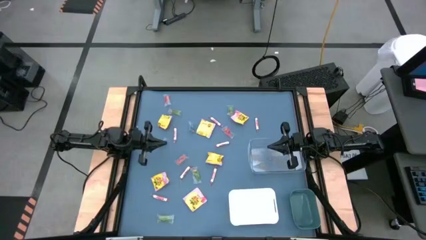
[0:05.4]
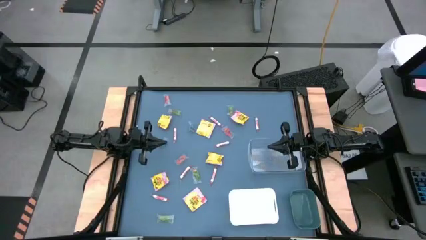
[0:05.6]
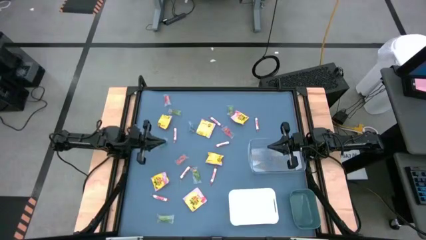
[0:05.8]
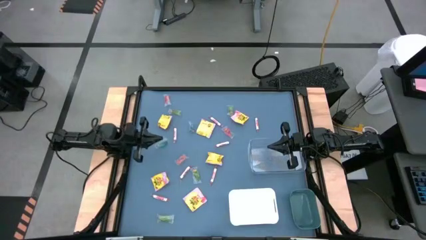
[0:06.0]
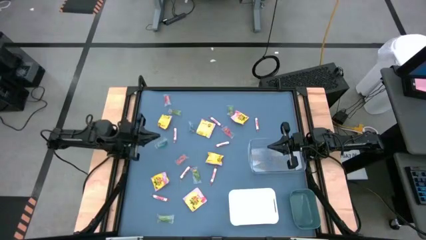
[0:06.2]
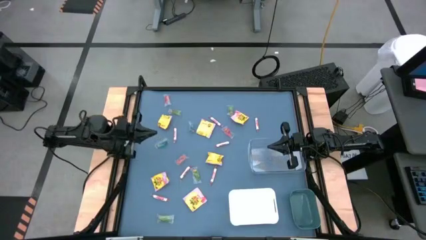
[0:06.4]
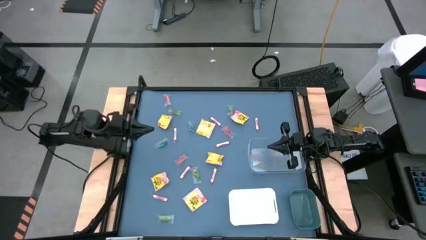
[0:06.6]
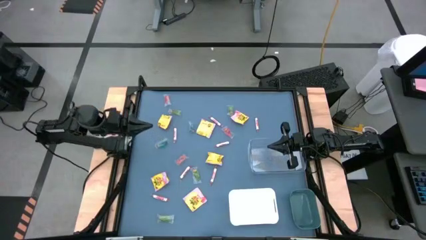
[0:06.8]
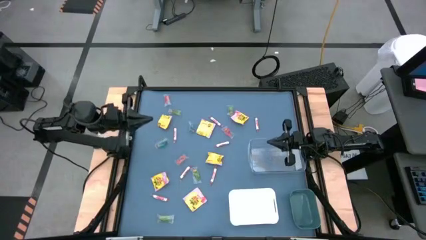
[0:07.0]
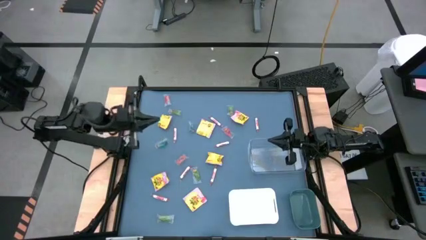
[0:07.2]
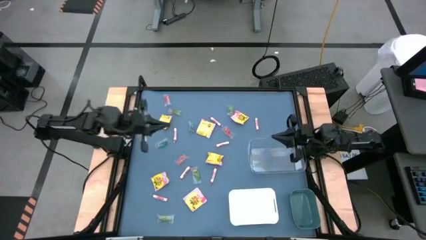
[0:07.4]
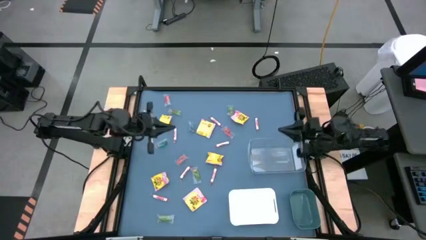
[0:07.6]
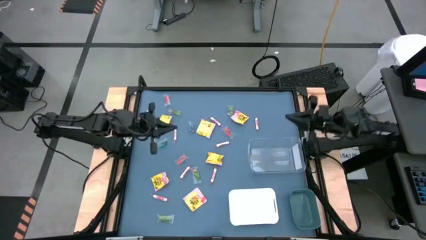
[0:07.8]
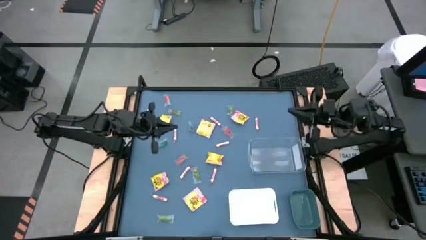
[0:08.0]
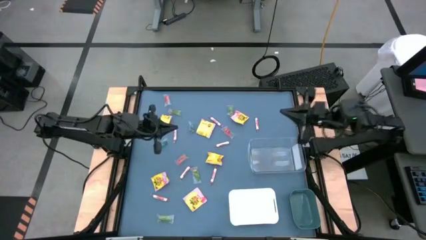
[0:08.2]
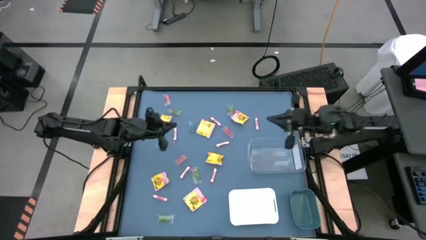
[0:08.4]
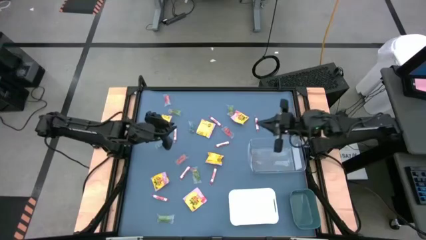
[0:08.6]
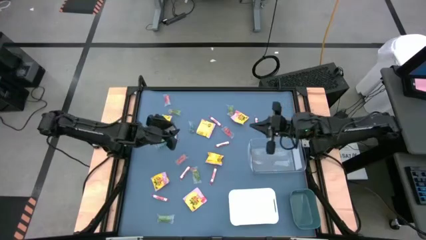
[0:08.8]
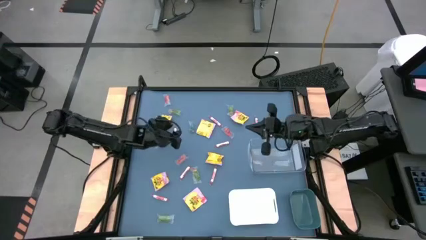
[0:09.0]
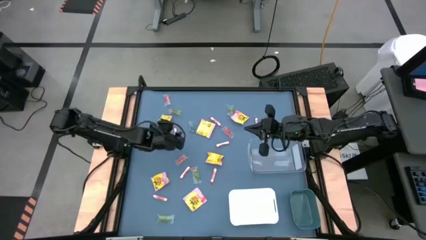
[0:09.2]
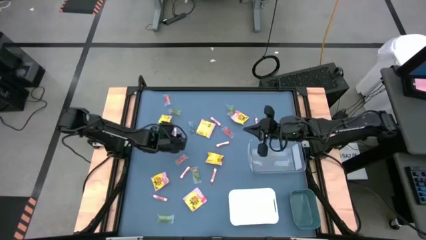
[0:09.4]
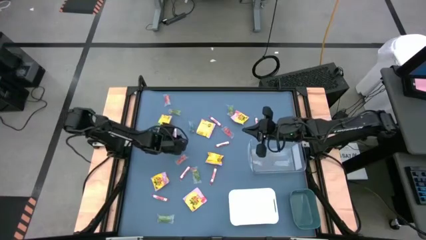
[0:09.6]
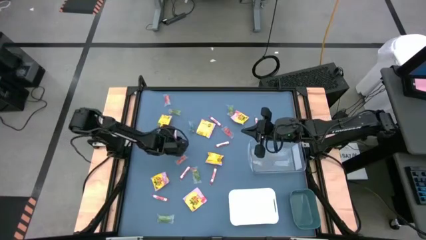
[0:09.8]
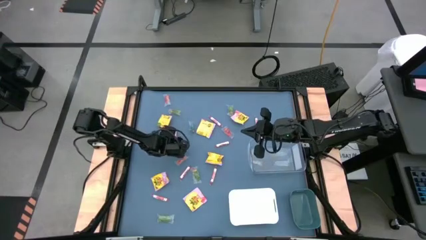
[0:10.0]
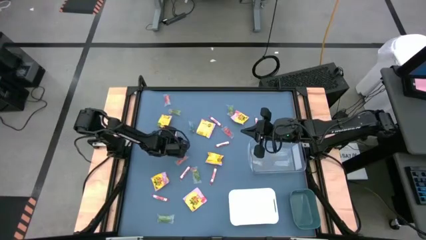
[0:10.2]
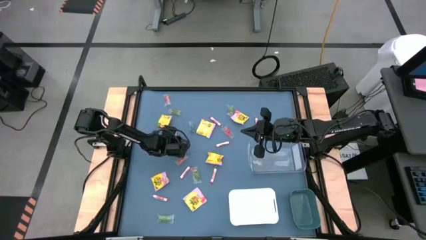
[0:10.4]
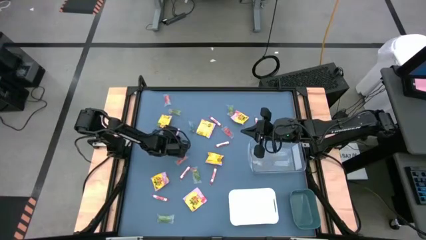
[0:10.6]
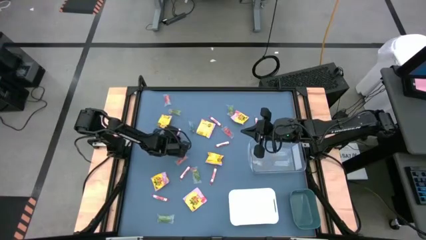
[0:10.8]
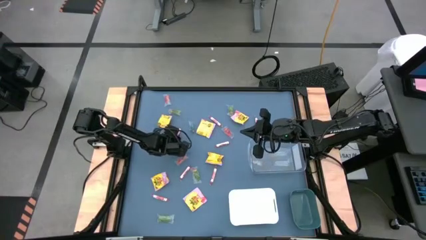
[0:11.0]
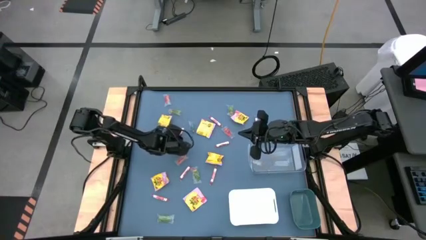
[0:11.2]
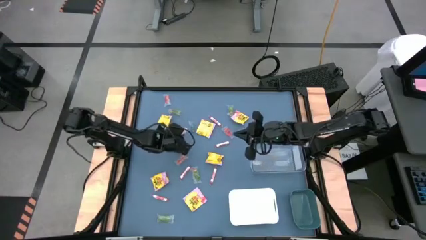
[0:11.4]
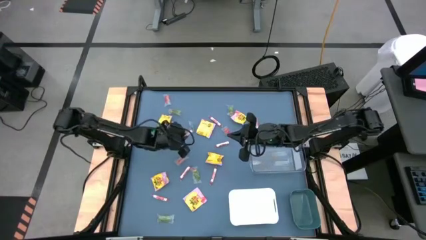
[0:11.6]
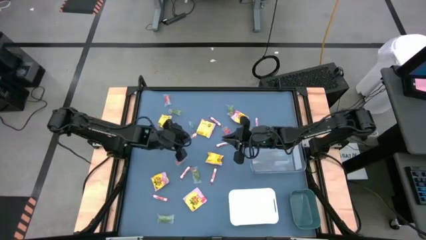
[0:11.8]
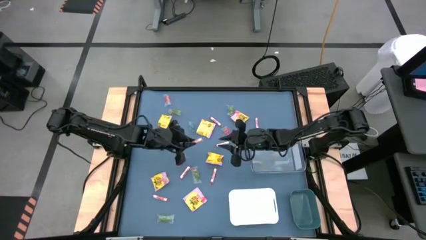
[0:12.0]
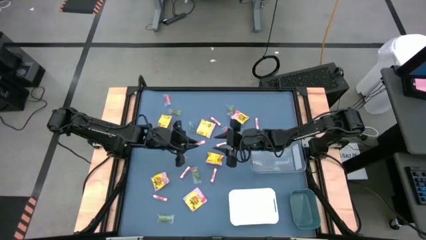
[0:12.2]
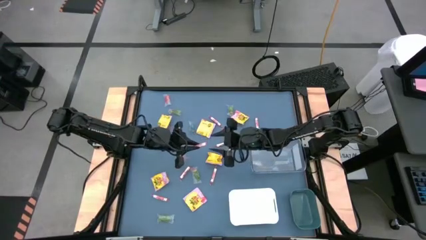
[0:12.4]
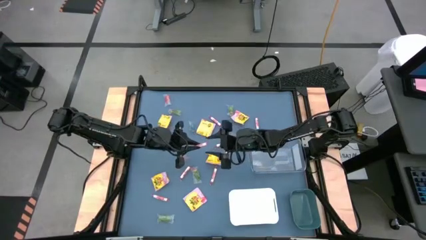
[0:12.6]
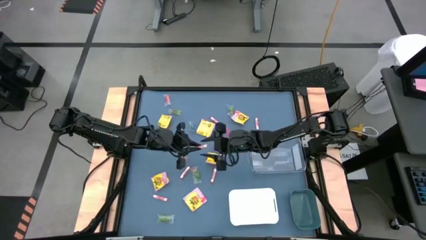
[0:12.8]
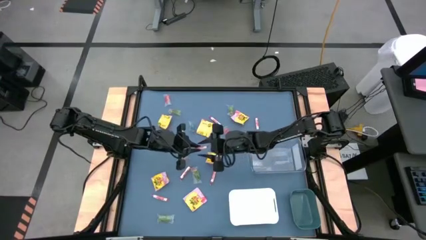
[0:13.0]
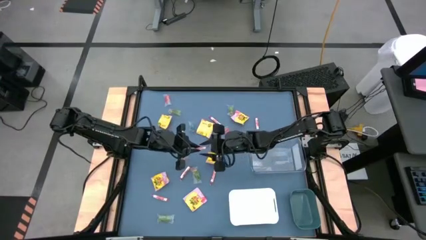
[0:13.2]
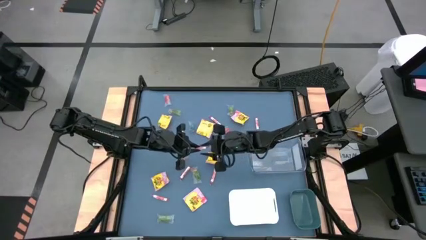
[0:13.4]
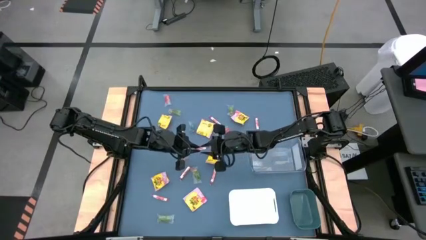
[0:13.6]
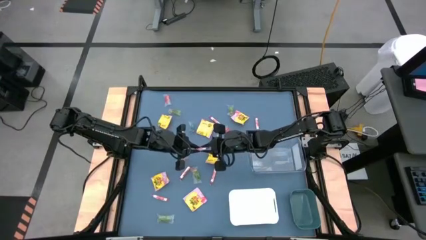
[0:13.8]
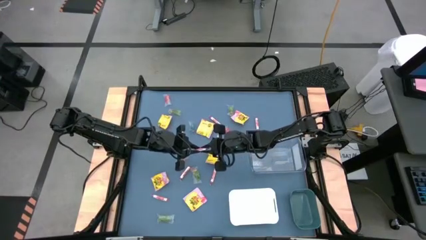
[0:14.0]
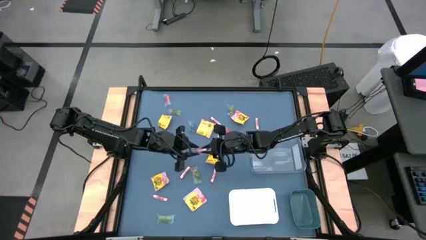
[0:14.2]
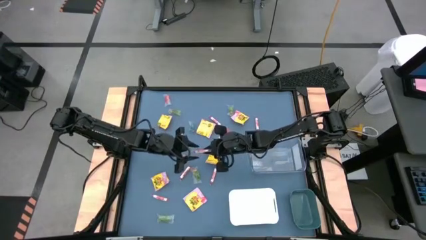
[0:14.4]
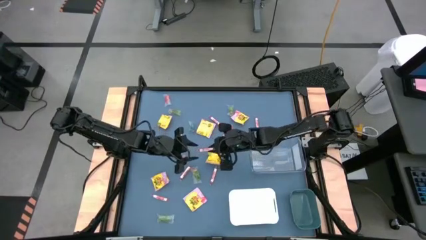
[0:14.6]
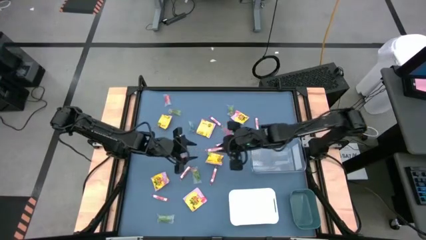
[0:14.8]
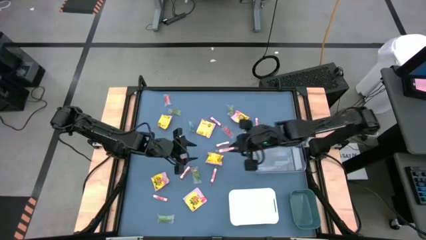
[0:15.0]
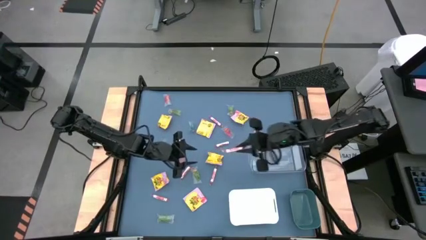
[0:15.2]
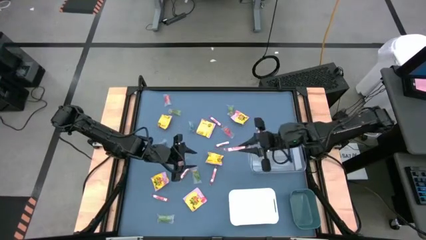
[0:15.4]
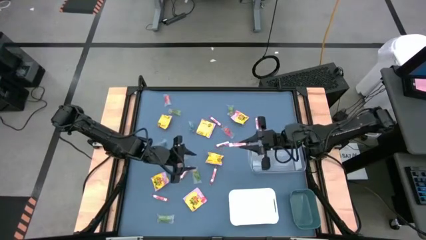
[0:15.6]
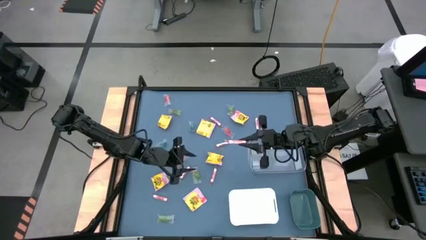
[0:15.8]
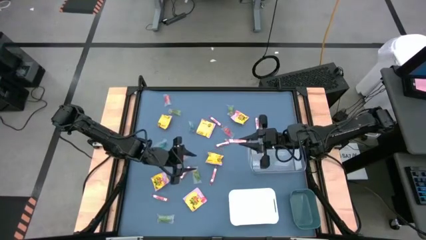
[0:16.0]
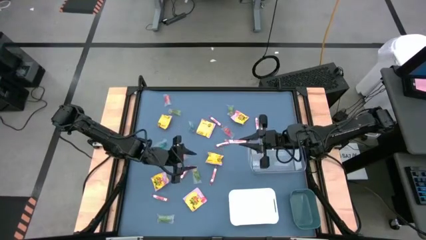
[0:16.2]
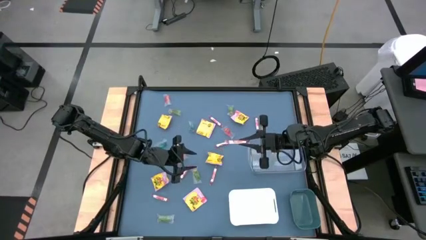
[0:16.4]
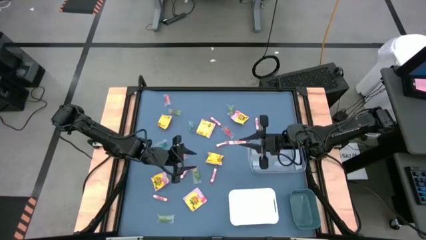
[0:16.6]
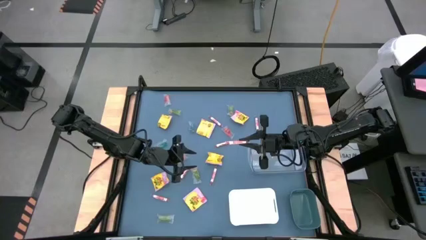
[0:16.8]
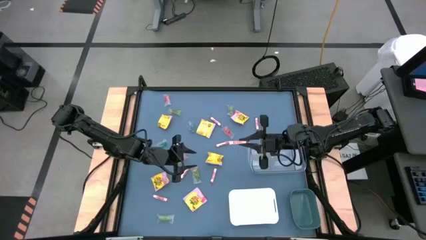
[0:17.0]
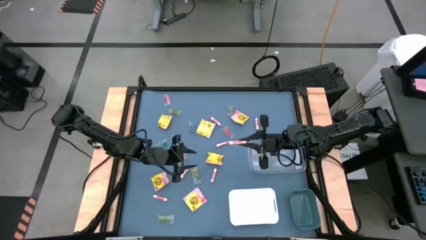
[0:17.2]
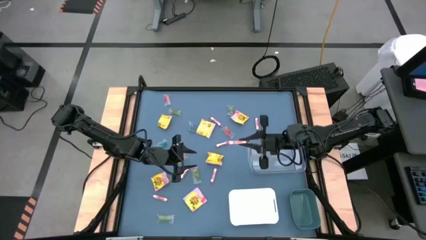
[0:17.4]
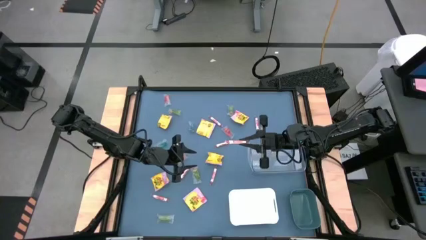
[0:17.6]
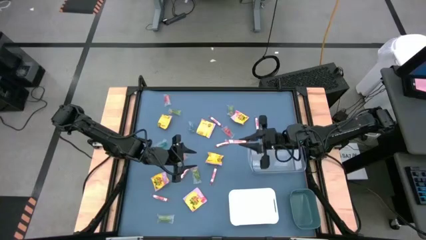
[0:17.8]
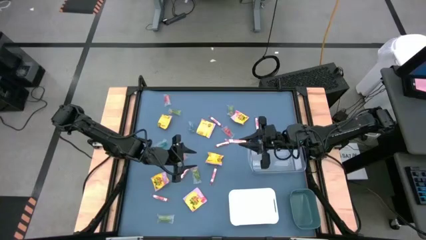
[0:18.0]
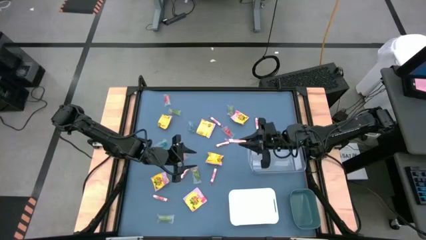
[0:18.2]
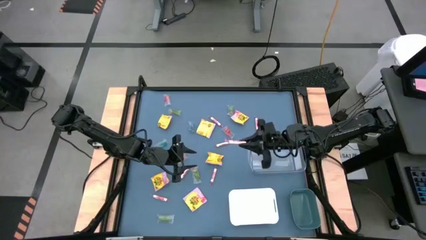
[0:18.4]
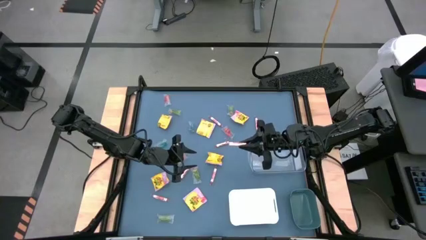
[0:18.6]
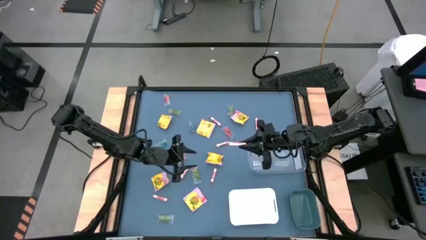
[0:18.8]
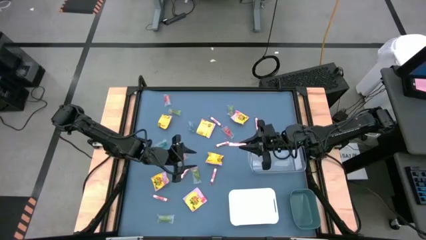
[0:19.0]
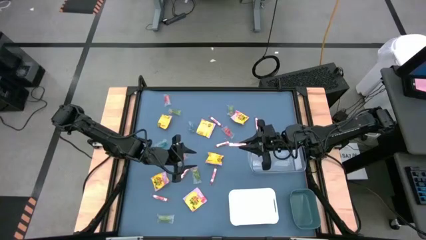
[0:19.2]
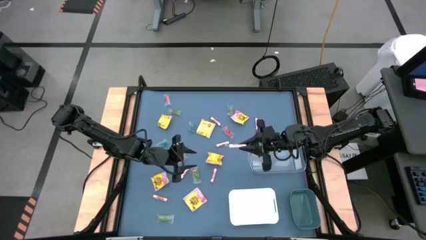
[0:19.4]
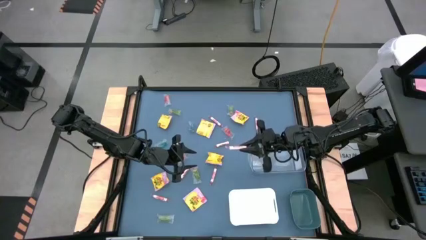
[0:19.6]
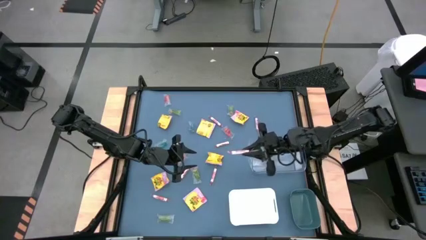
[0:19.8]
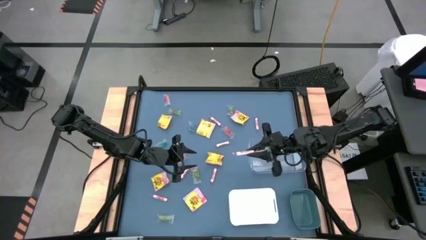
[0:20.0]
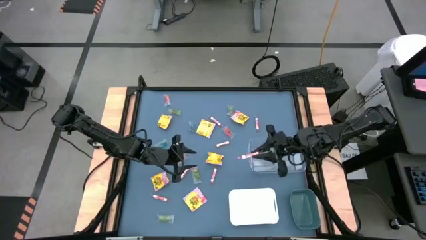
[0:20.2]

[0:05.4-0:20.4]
Task: Sort candy
Put the transparent candy roll into the transparent bin

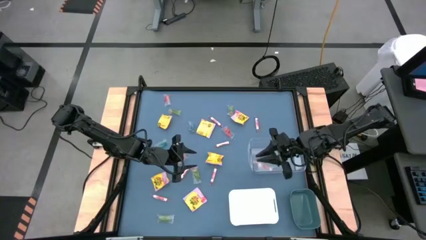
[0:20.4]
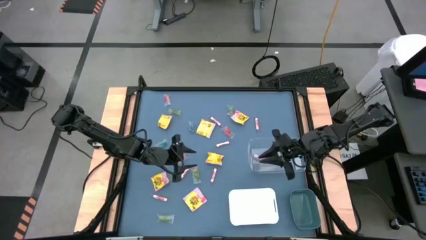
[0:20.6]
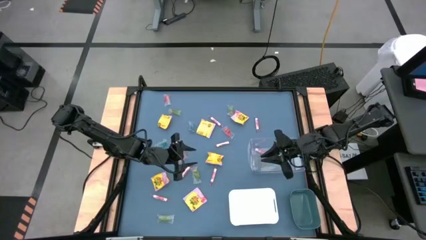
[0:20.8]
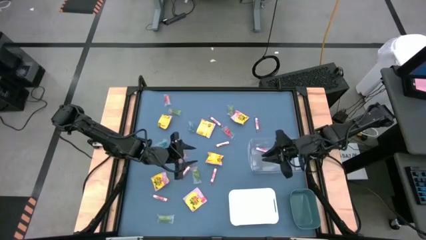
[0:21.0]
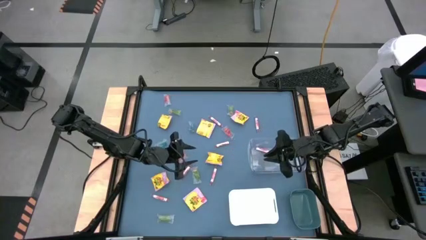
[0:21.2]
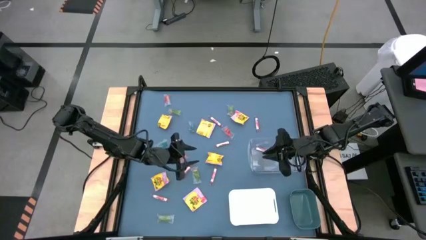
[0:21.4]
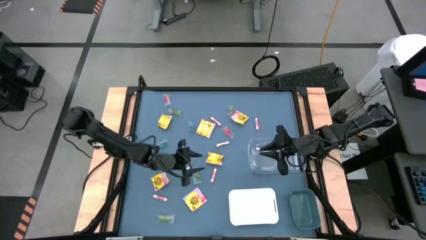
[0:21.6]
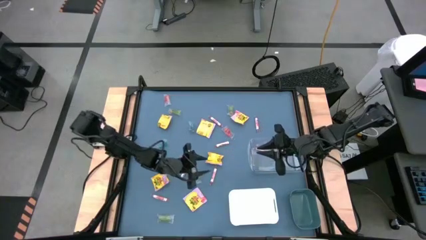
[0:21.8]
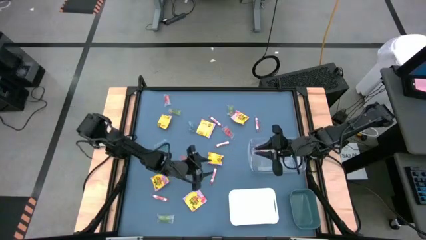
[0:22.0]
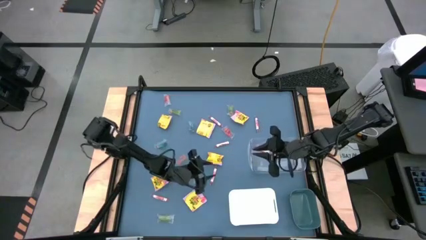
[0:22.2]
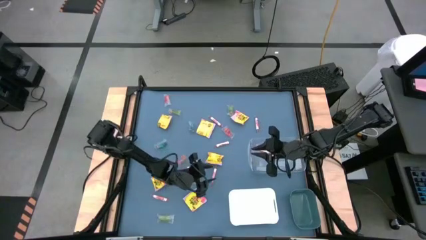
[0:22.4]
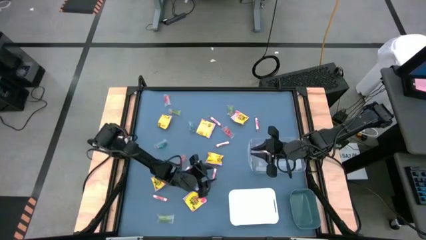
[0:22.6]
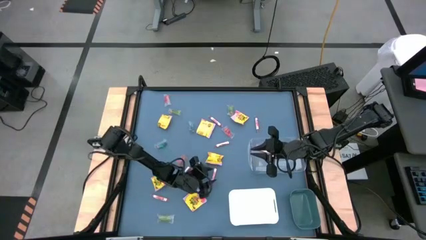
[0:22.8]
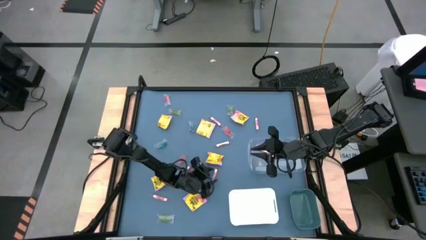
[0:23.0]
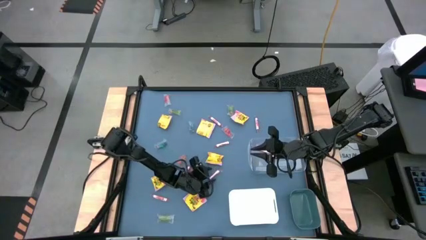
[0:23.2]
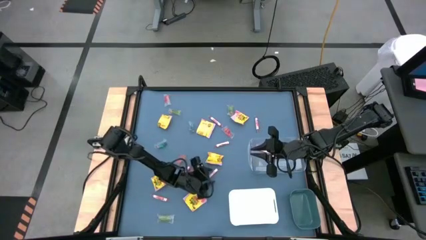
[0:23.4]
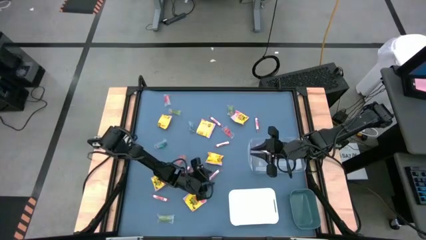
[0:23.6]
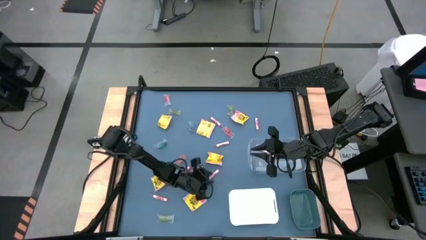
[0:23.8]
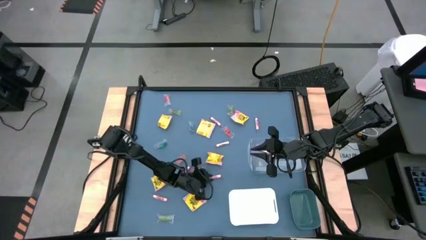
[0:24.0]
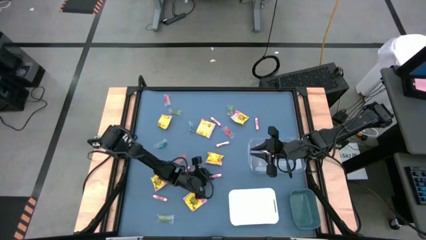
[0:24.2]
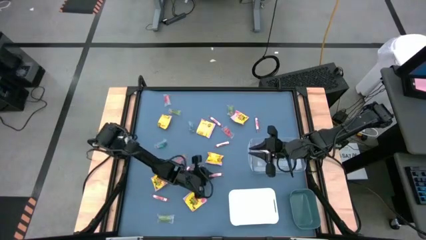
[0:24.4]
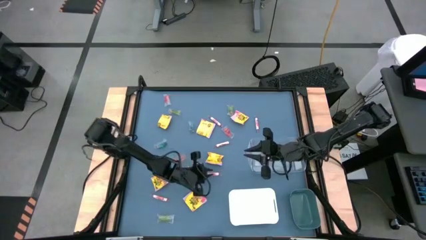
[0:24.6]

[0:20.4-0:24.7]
Put the transparent candy roll into the transparent bin
